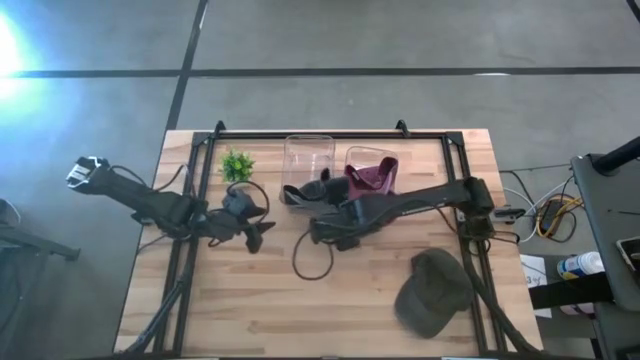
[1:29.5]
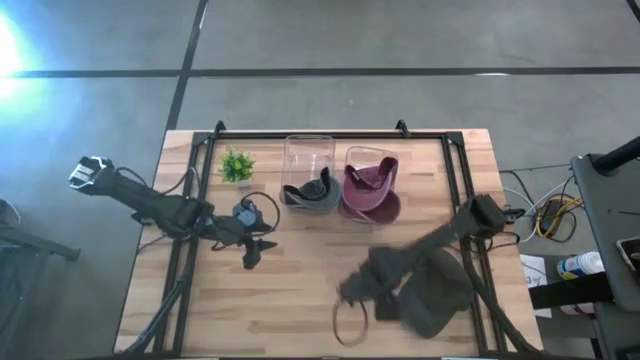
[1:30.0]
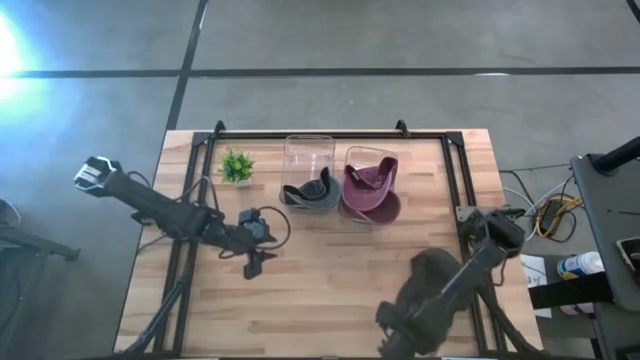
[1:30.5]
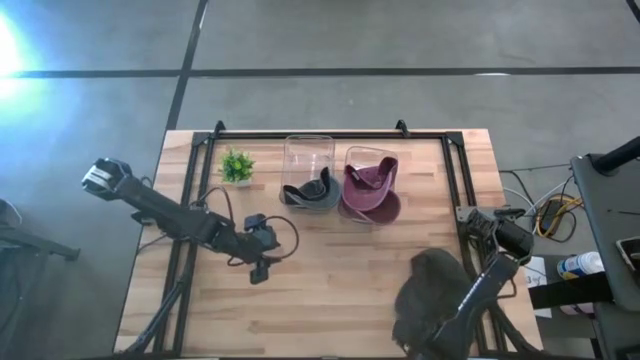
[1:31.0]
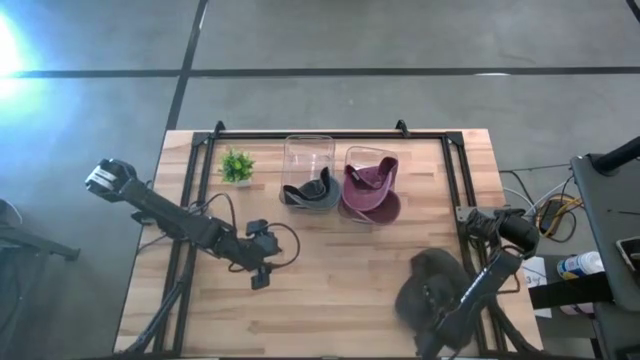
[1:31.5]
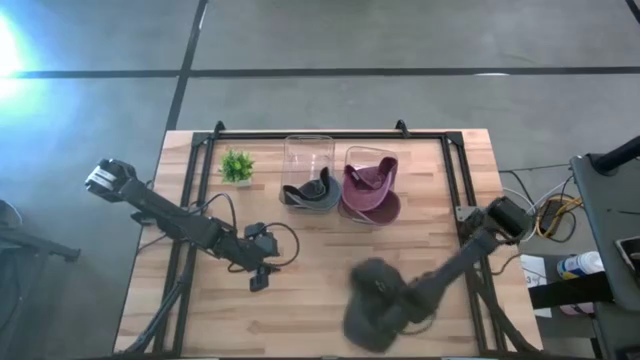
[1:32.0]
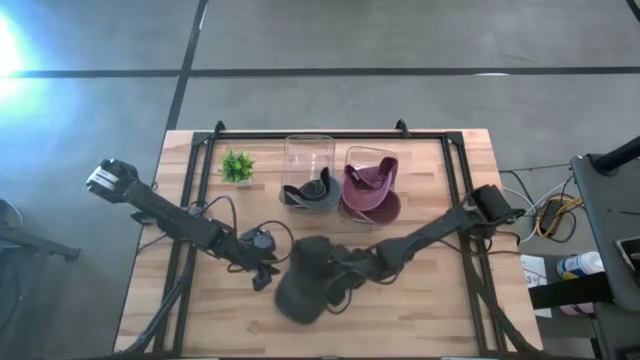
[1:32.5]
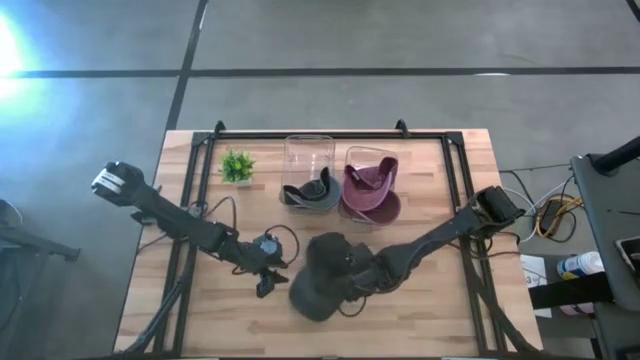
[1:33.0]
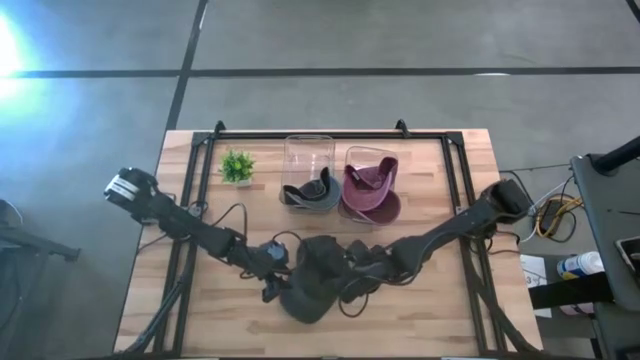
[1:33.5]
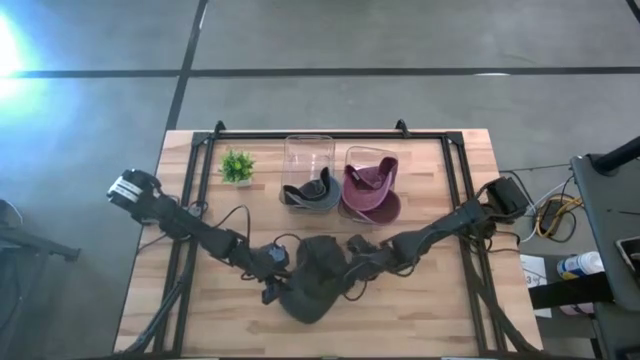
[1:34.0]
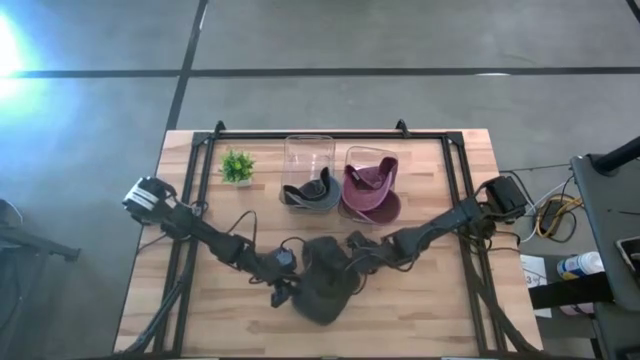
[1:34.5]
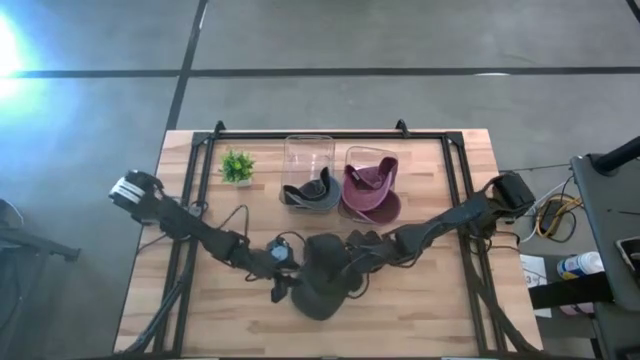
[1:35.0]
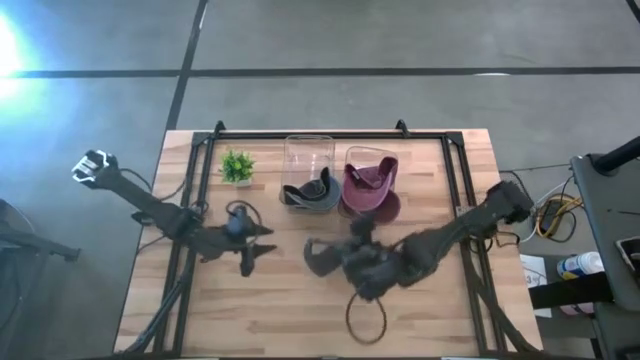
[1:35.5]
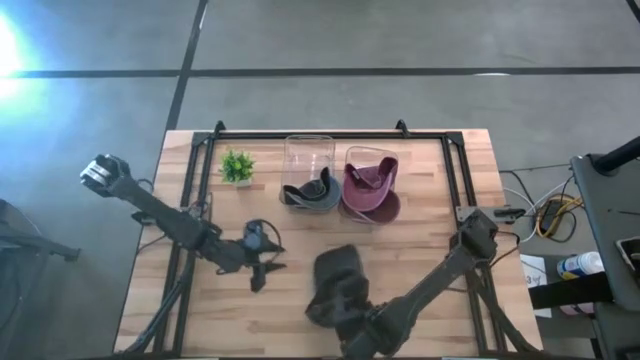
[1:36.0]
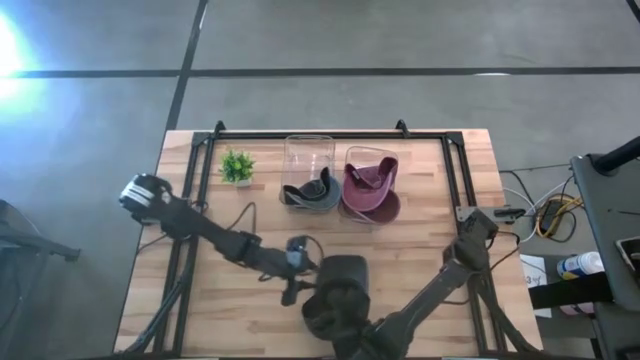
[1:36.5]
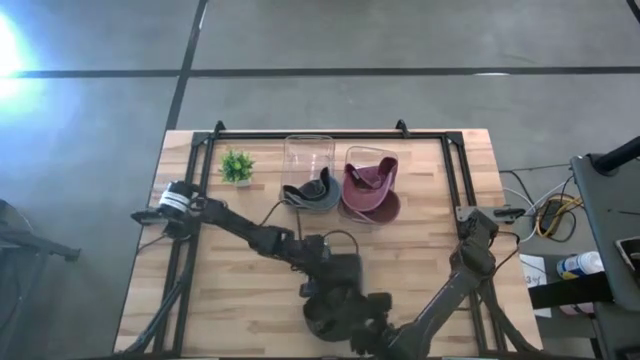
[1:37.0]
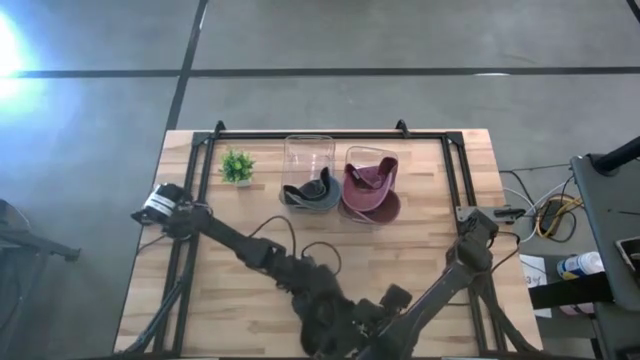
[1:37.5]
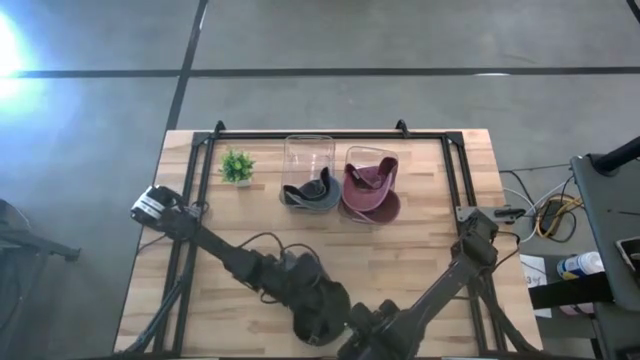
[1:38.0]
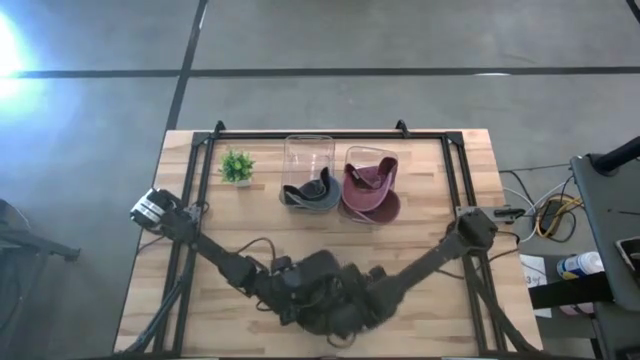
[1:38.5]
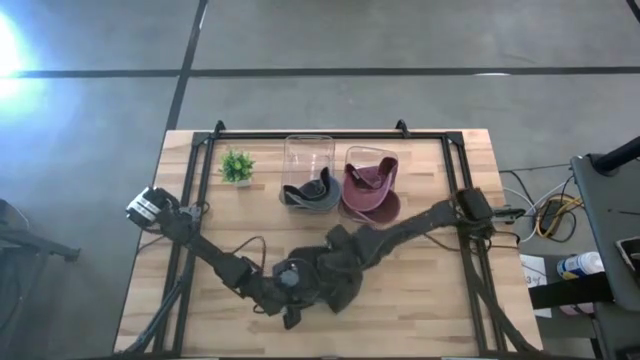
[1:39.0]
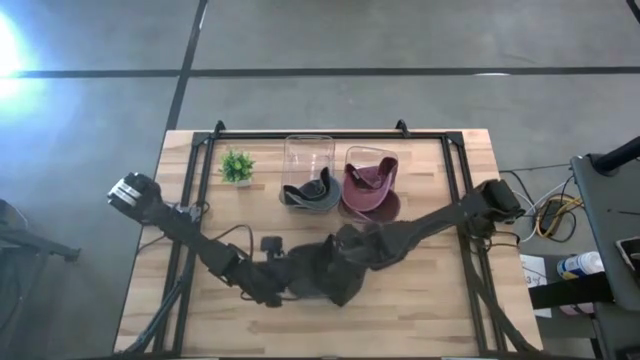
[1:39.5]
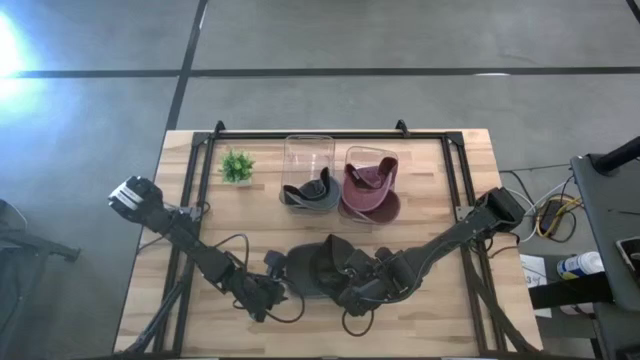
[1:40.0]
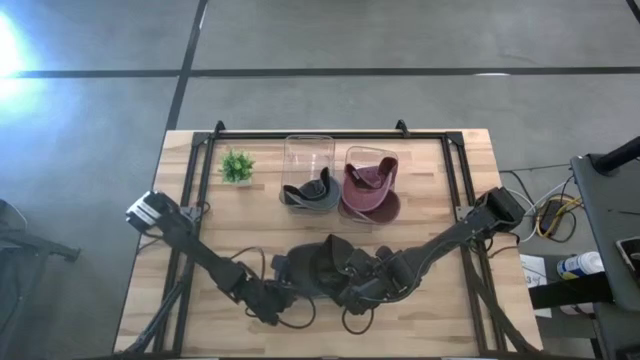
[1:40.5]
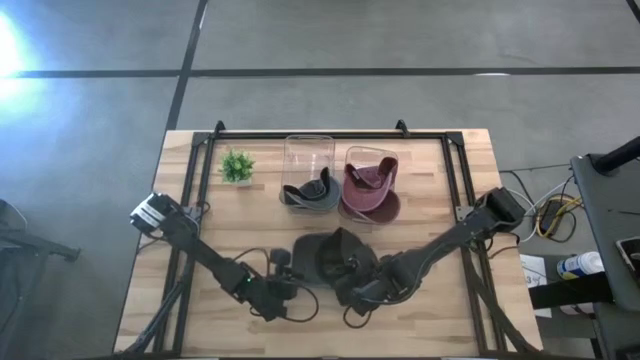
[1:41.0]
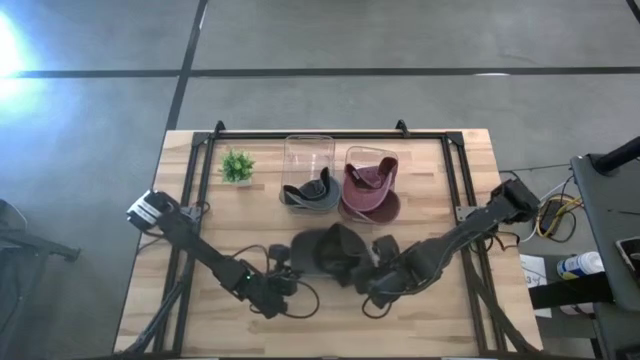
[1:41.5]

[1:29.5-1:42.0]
Task: Pick & Place hat
Put the black cap into the left transparent bin

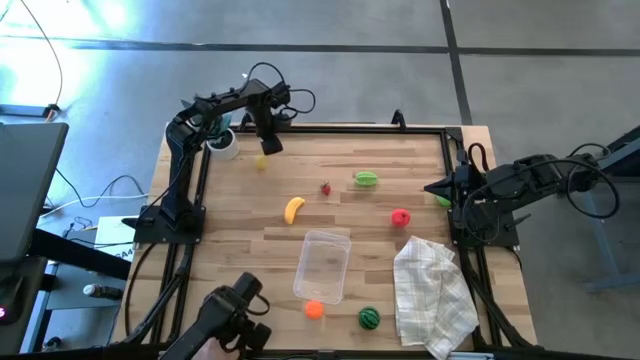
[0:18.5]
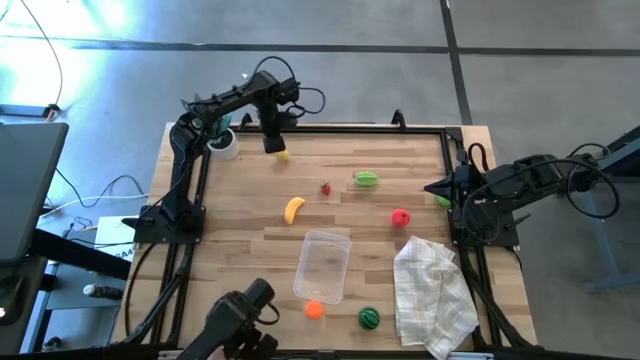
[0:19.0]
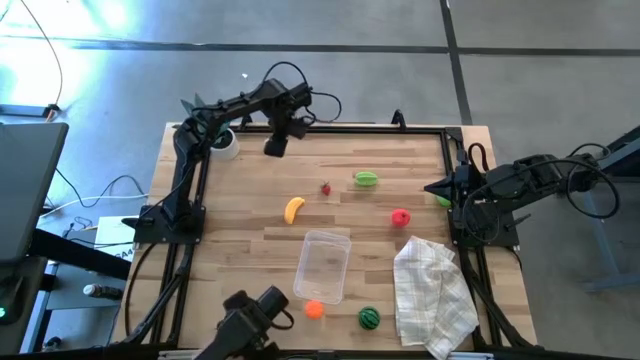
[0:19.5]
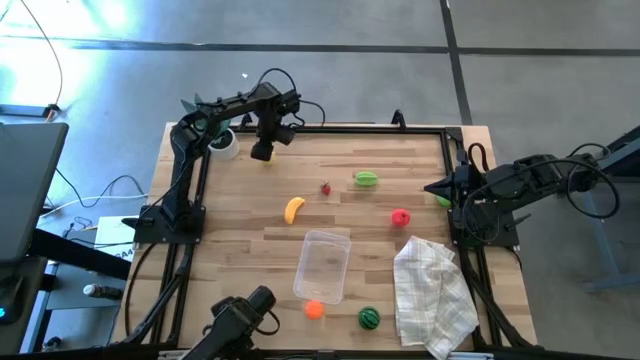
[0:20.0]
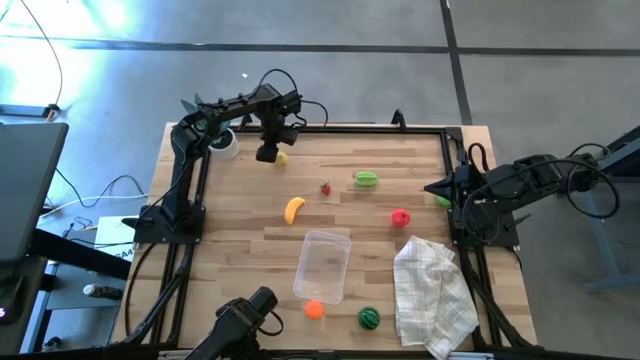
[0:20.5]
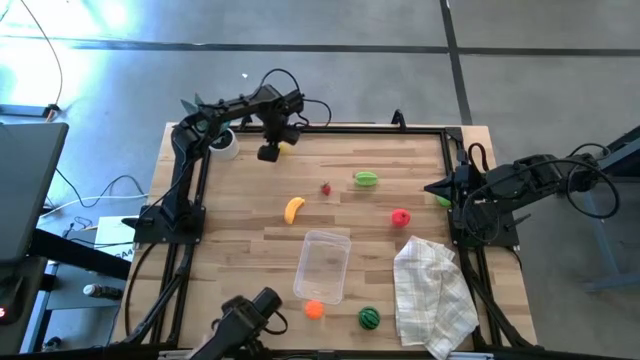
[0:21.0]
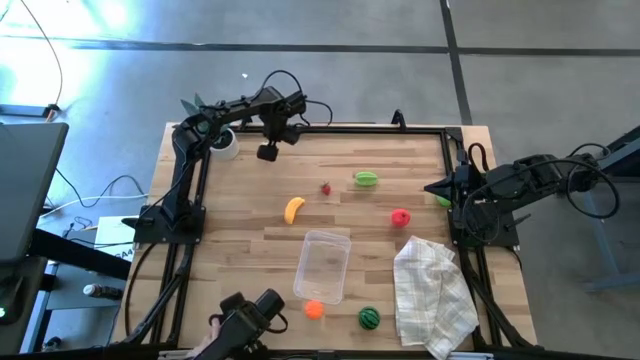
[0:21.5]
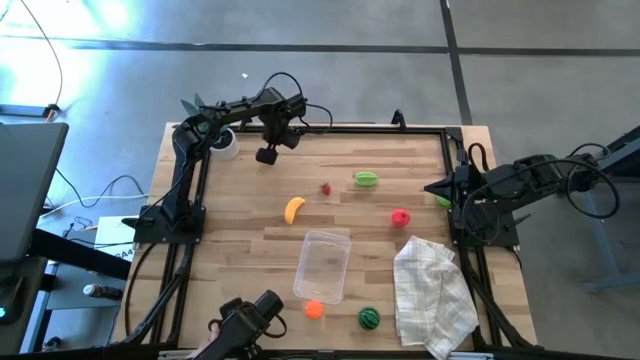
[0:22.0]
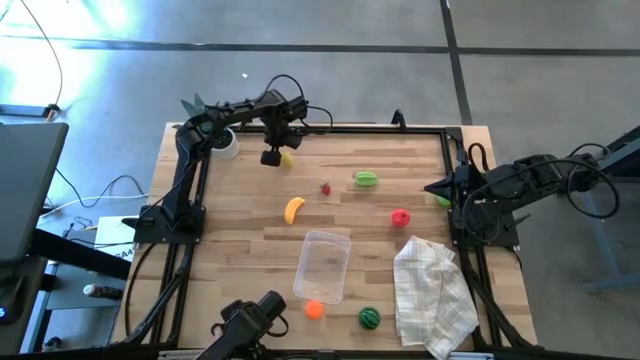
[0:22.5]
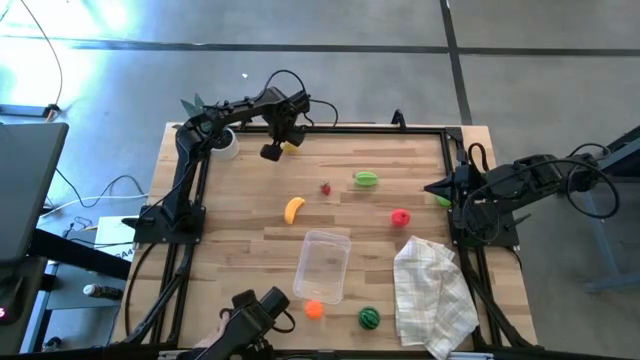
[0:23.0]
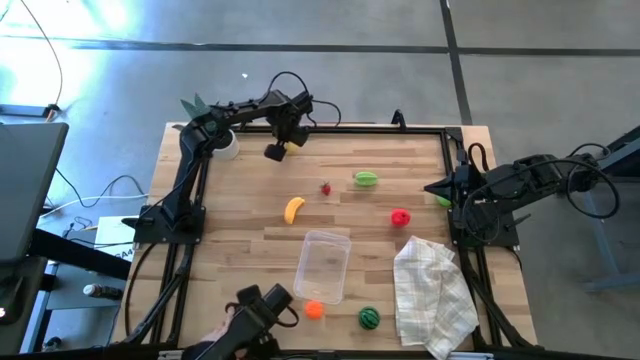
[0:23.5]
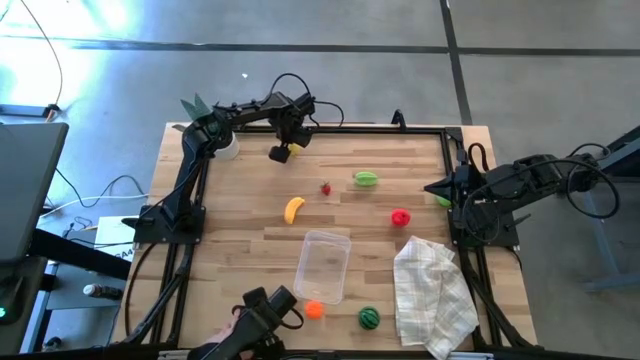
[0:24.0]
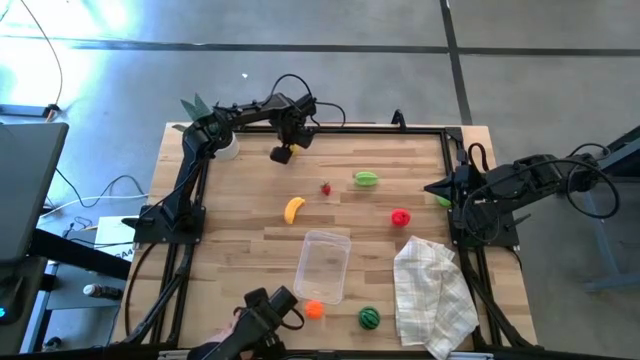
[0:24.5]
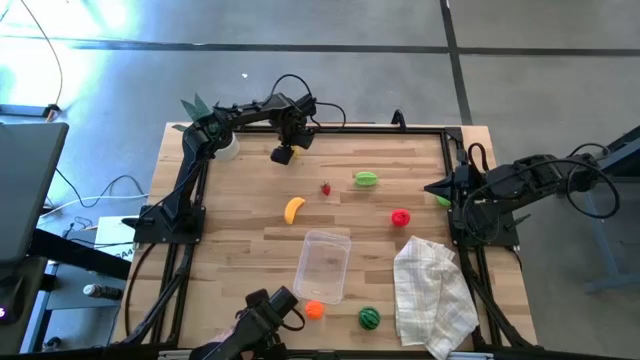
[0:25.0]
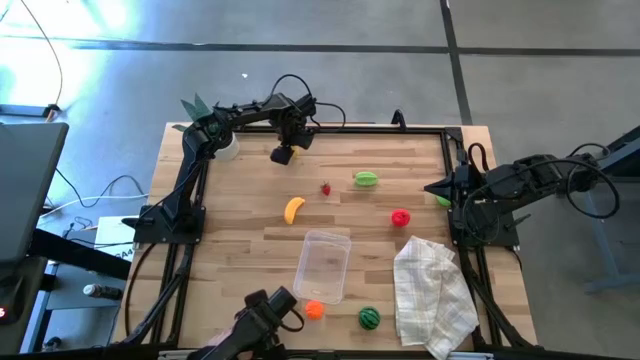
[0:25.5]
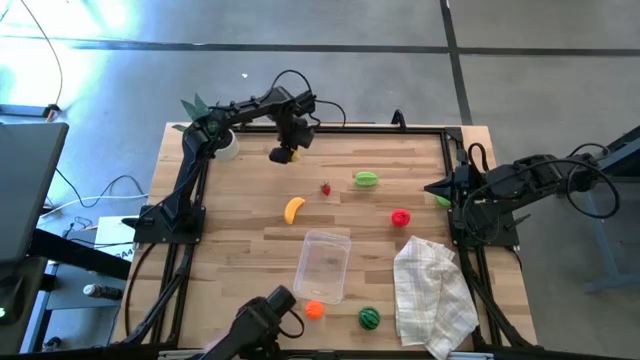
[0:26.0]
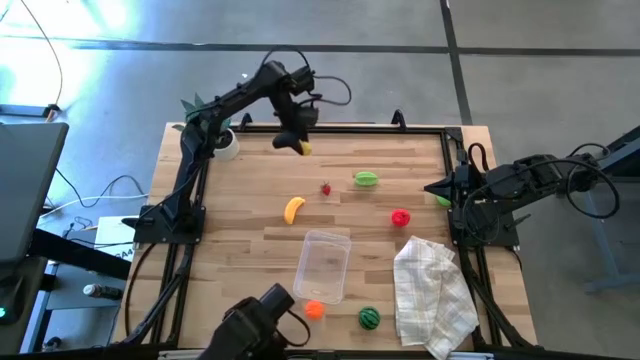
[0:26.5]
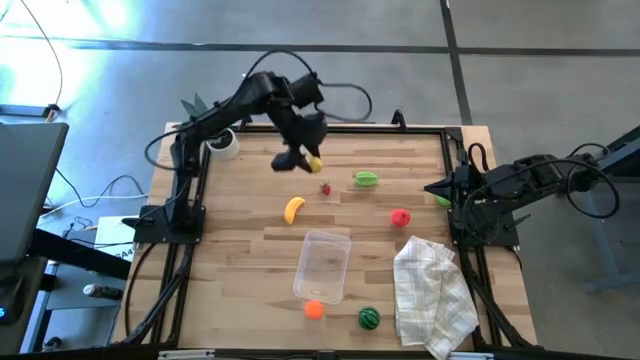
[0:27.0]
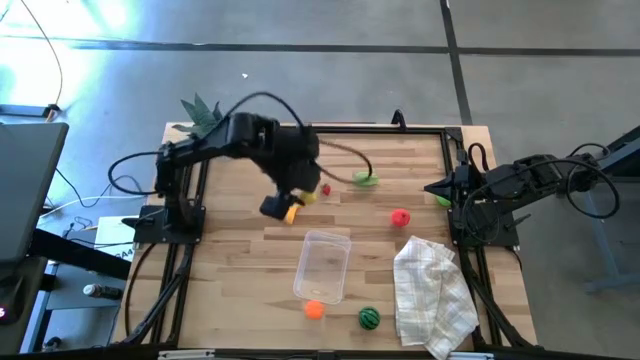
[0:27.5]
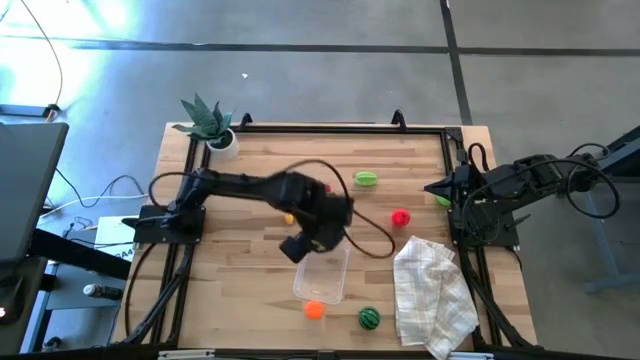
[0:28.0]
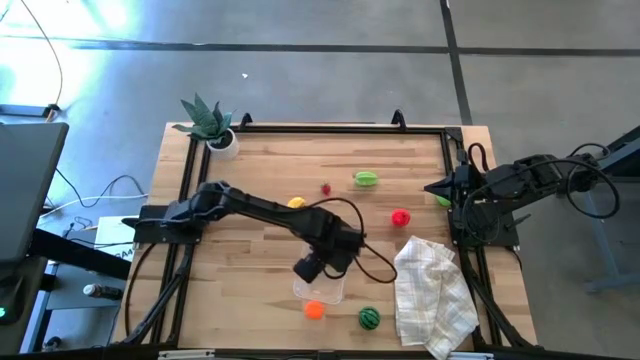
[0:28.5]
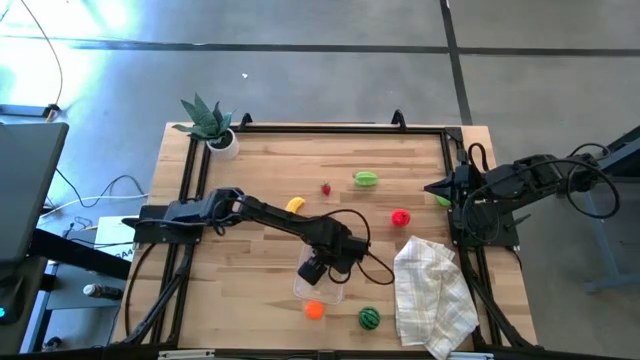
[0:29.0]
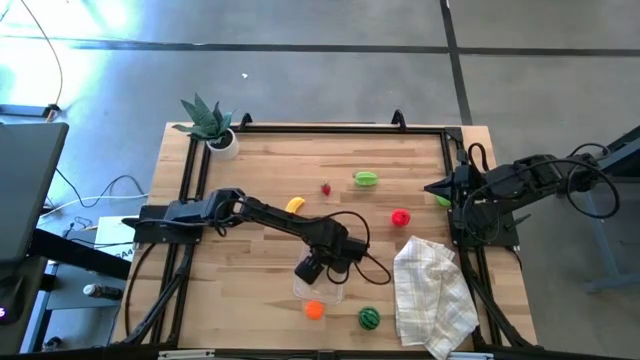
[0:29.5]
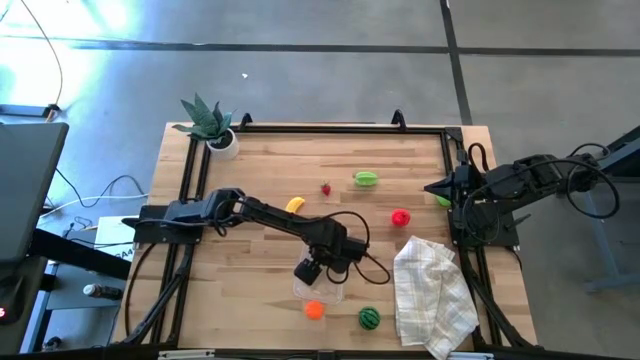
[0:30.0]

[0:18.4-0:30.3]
Task: Pick and placing Produce into tupperware
Put the lemon into the transparent bin
